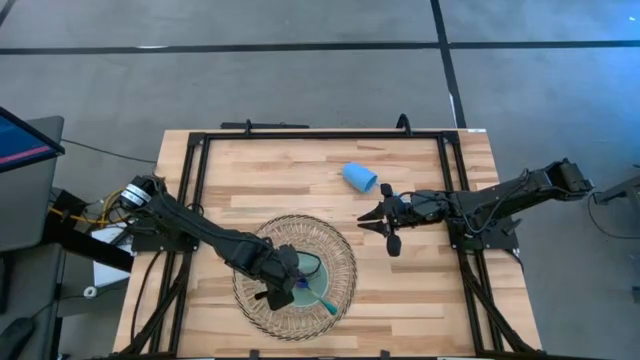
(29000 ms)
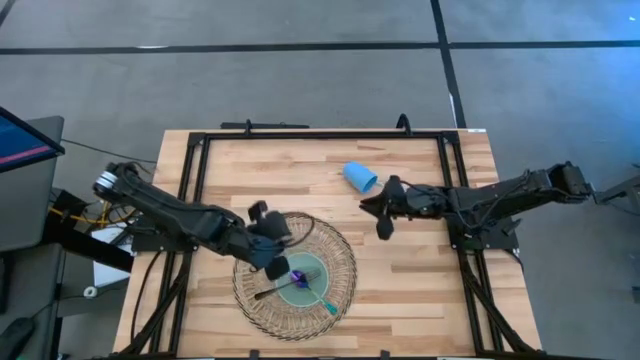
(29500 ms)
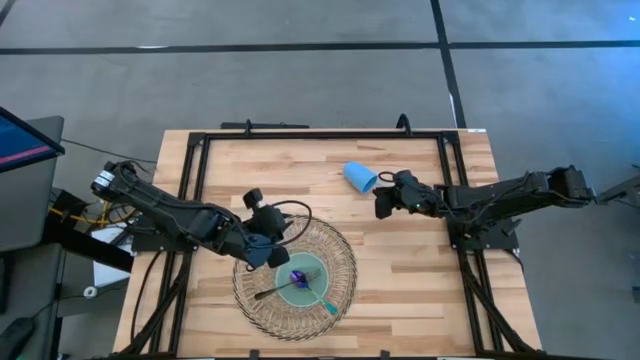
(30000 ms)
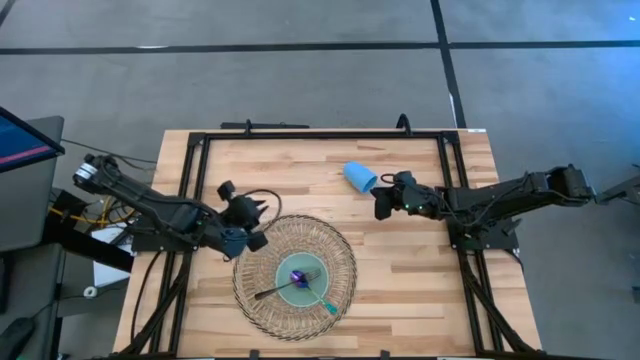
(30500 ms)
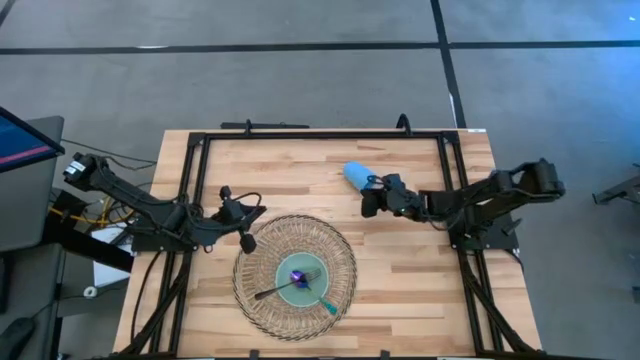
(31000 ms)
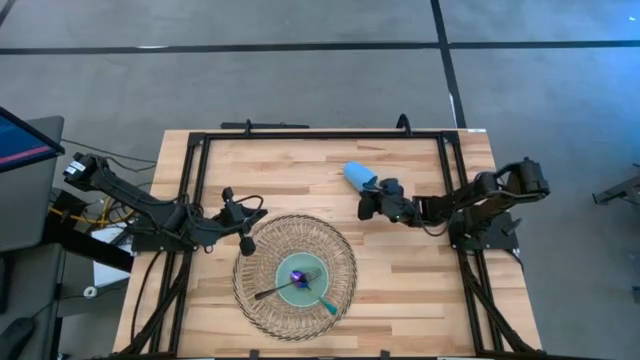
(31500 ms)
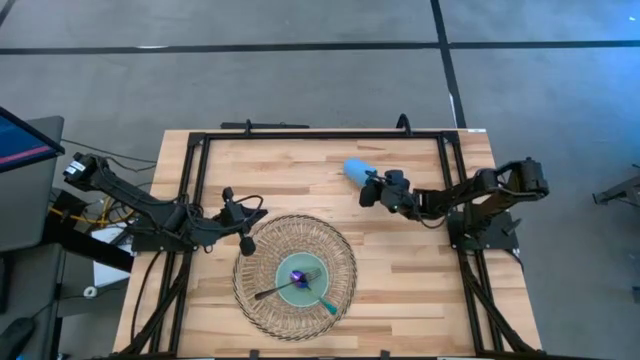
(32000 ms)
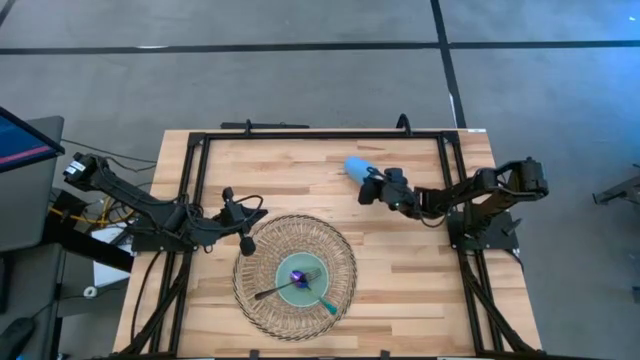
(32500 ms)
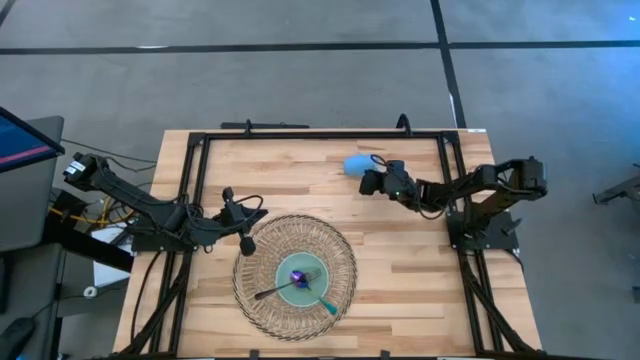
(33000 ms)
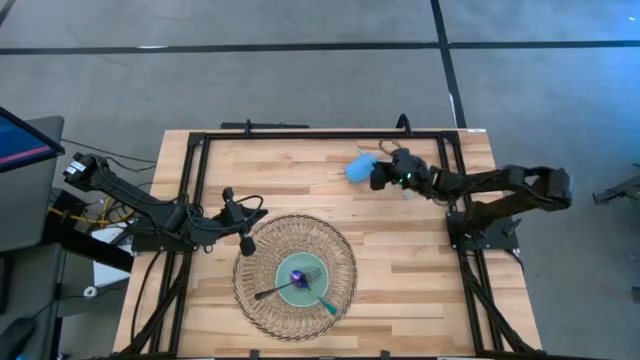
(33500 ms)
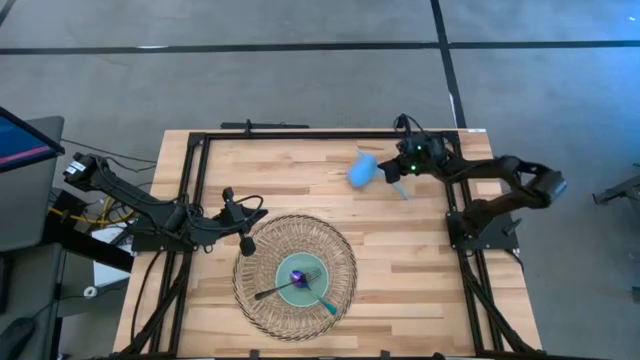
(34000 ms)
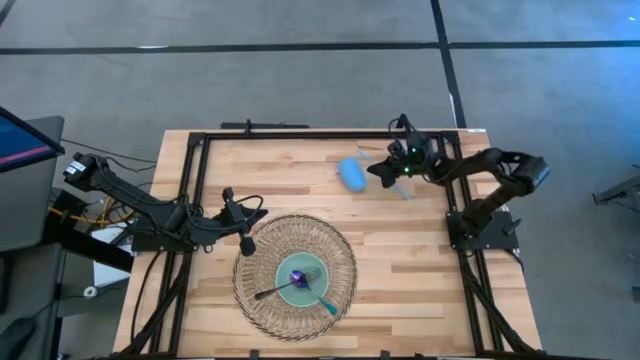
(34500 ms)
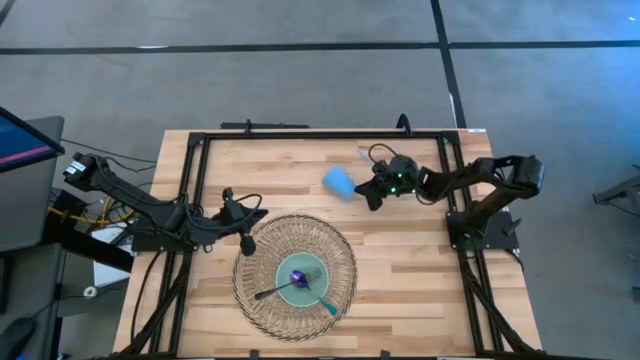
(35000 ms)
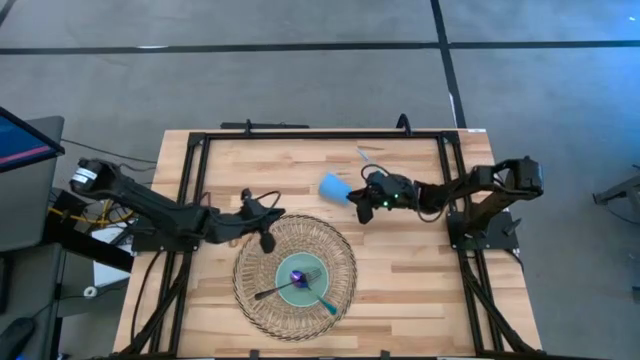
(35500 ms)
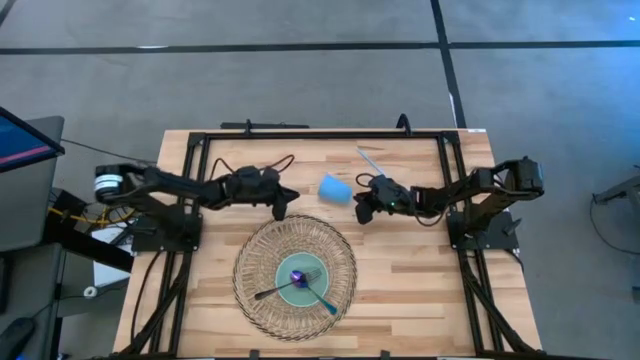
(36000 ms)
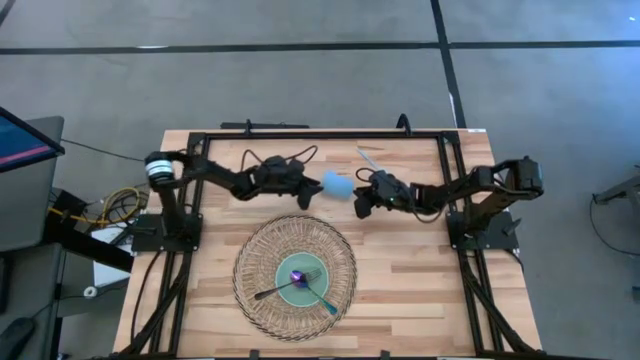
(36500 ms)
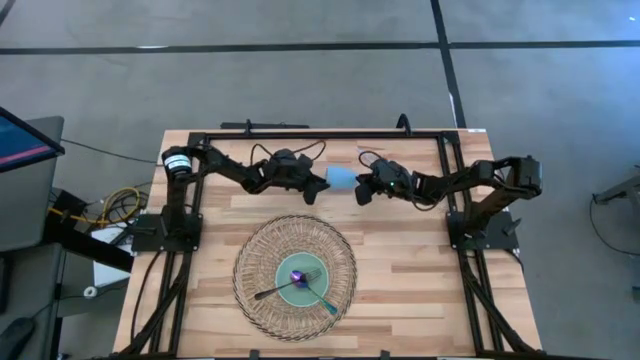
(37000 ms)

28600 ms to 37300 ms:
Task: Pick & Place Utensil
Put the blue cup on the top right of the woven placemat

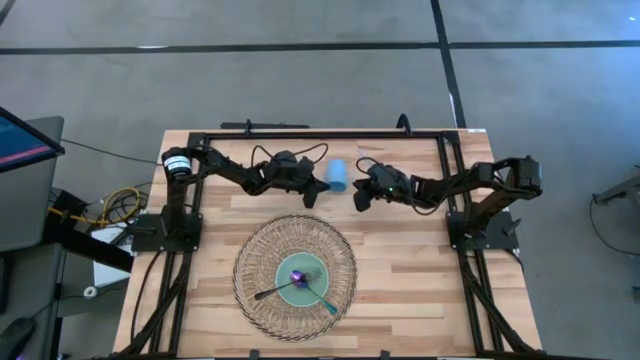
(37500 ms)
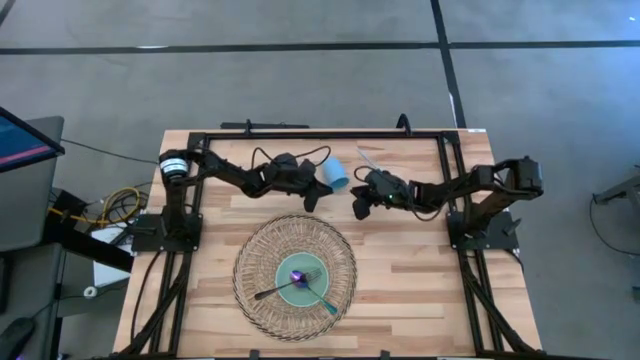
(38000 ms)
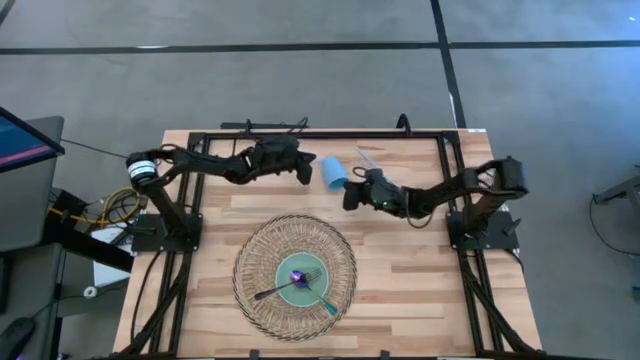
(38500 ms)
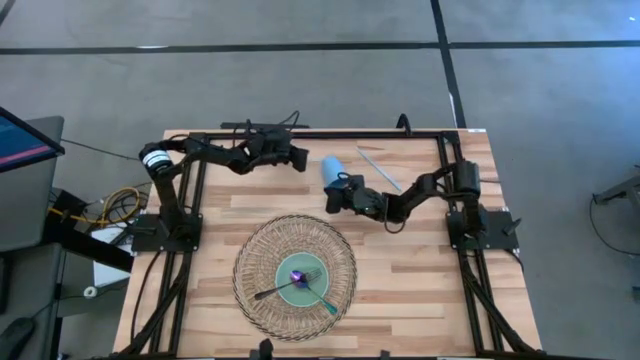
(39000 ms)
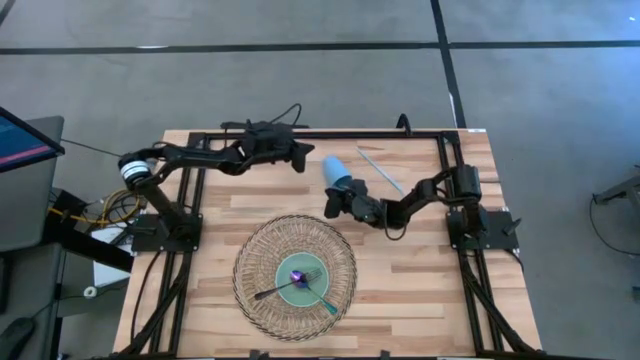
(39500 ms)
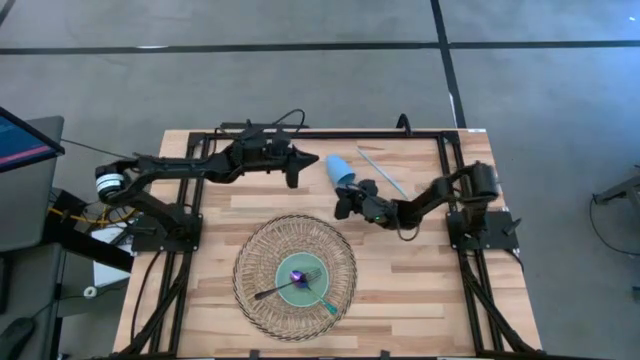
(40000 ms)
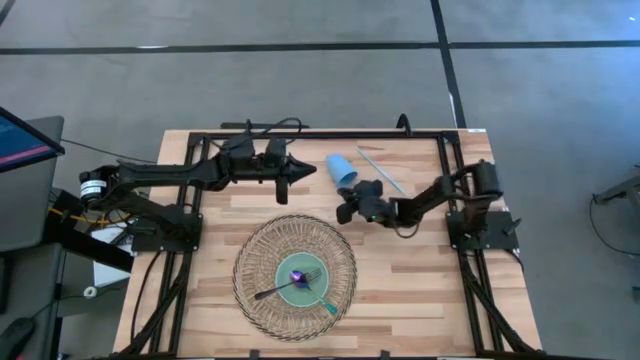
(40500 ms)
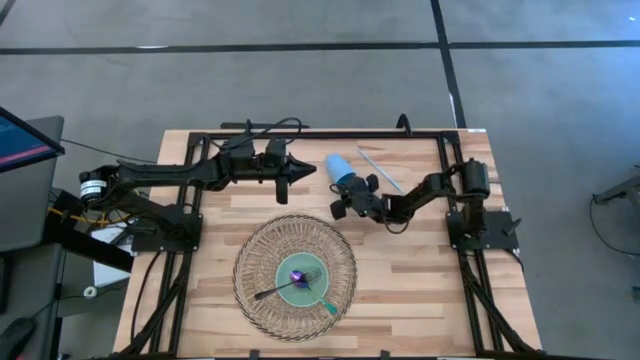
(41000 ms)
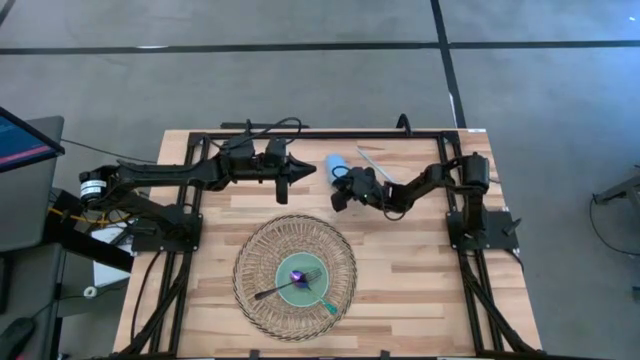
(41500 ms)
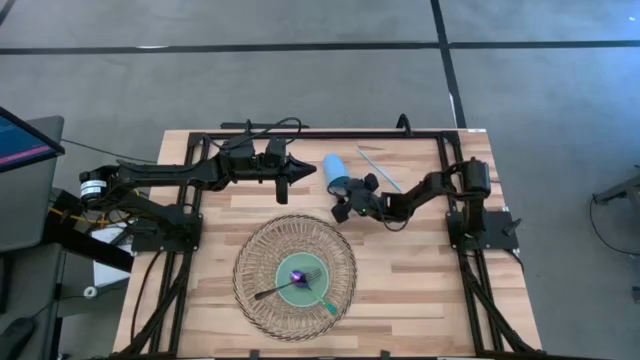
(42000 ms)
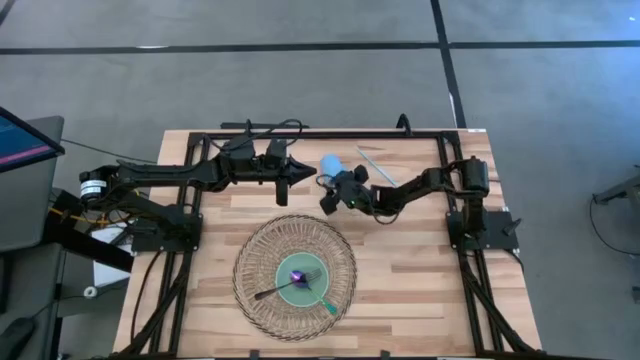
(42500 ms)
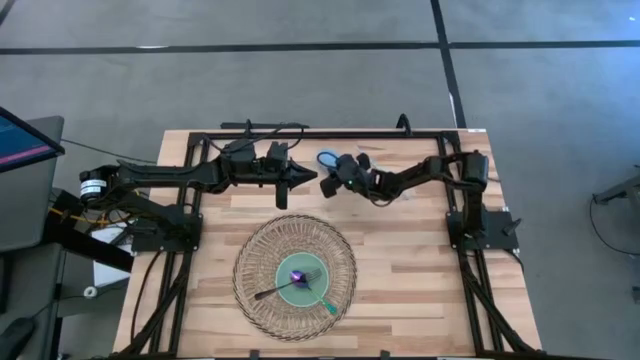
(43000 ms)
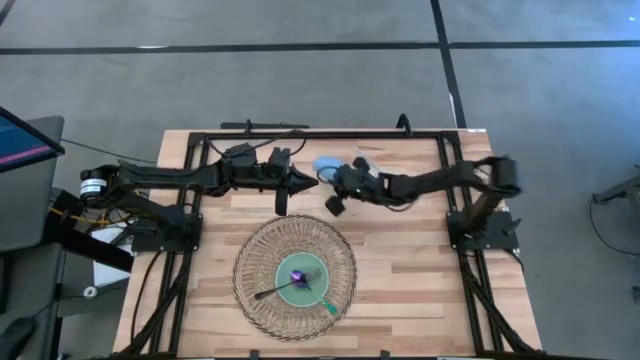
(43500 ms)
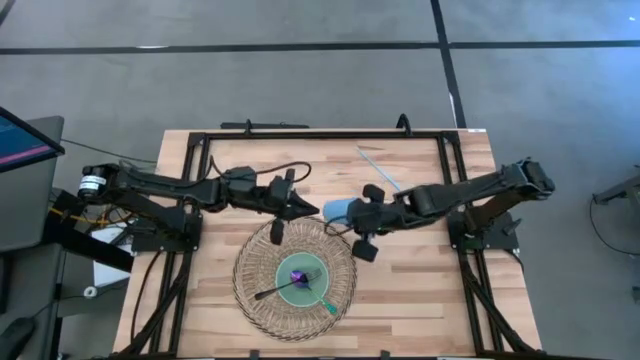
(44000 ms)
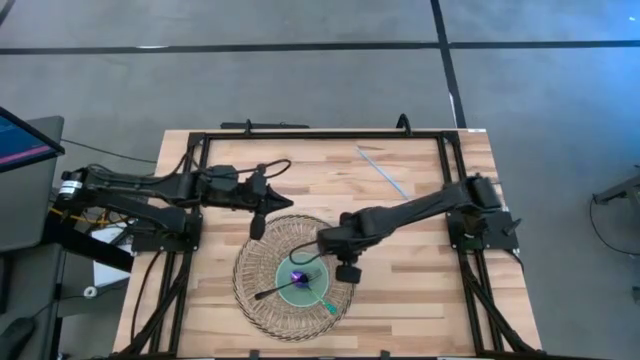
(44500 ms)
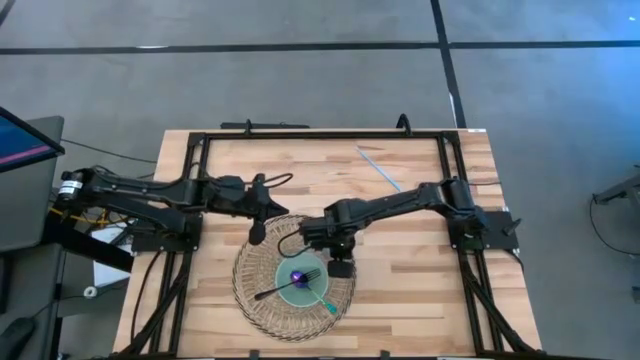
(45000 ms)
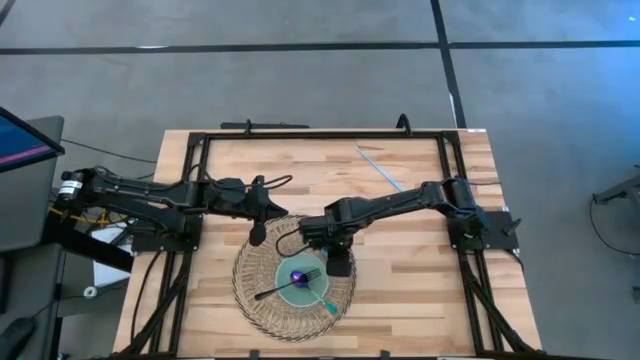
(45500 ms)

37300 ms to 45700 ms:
Put the blue cup on the top right of the woven placemat

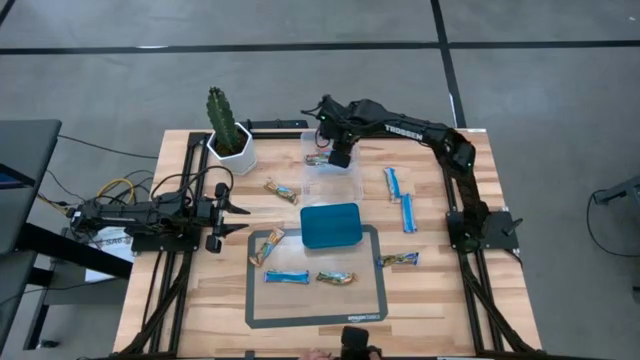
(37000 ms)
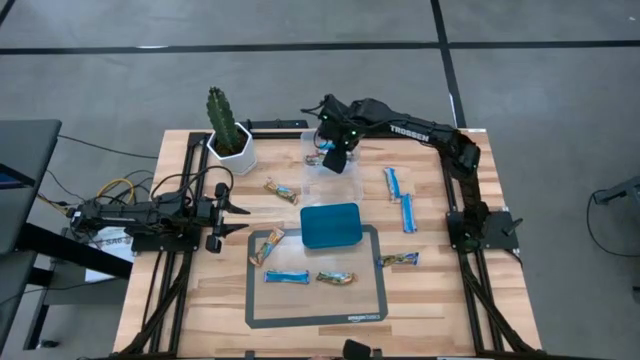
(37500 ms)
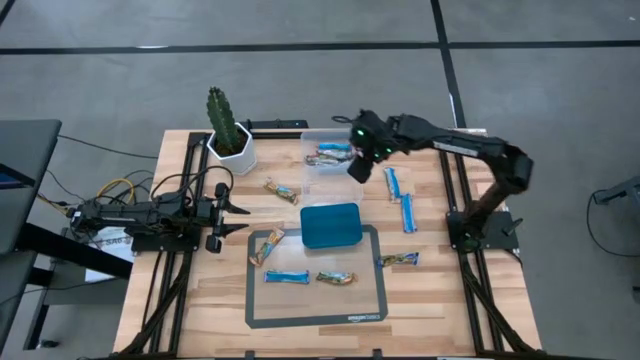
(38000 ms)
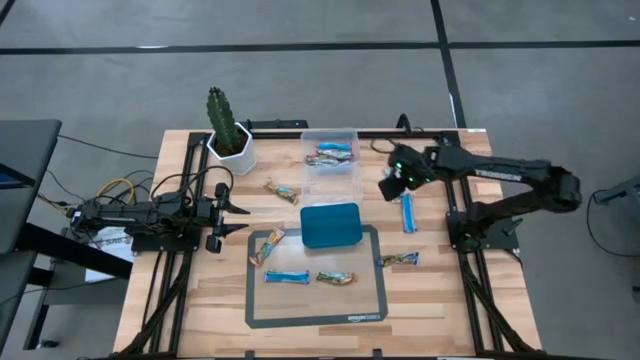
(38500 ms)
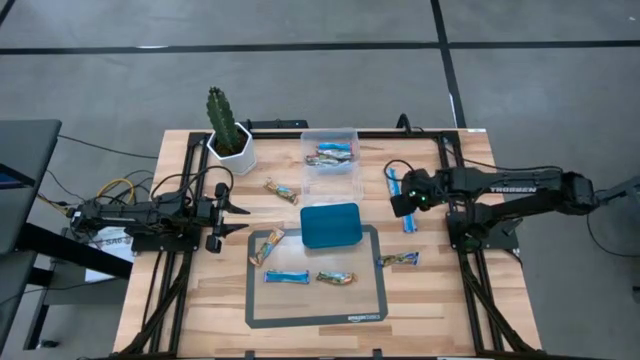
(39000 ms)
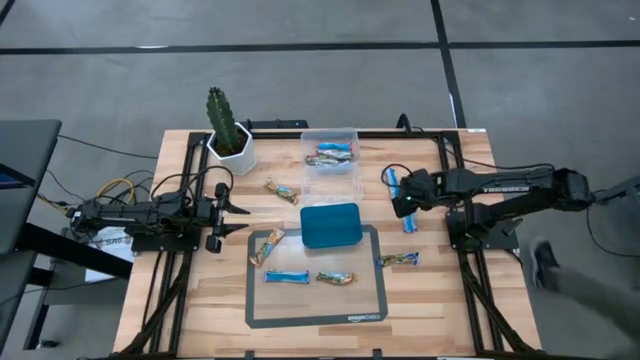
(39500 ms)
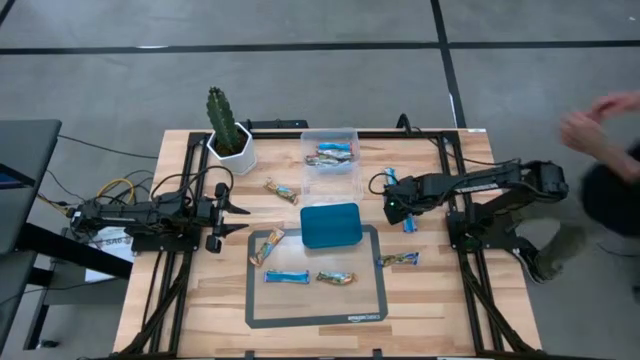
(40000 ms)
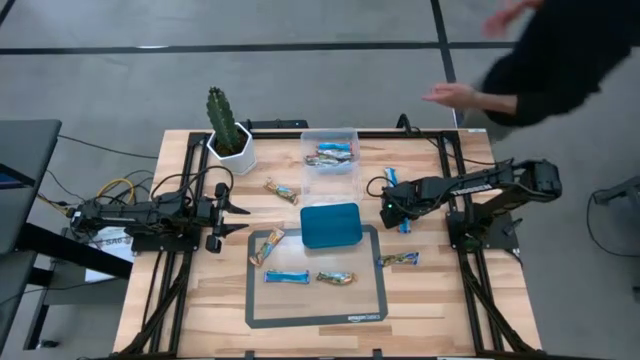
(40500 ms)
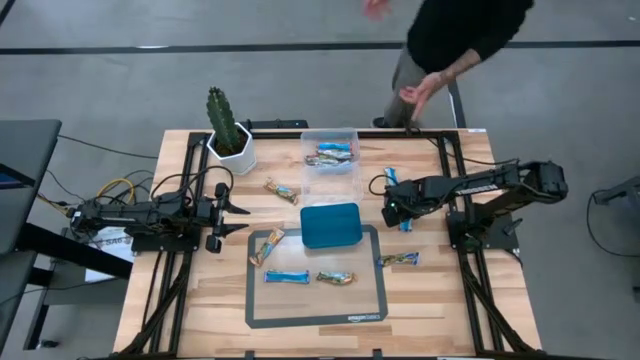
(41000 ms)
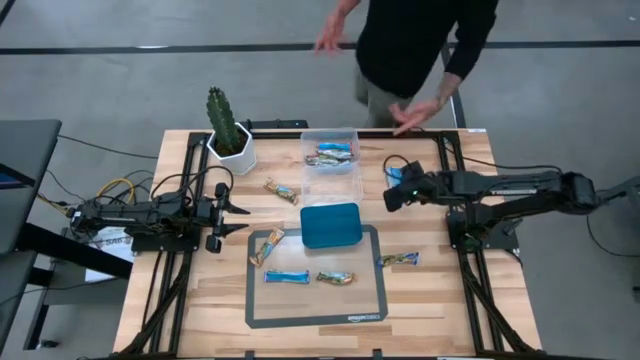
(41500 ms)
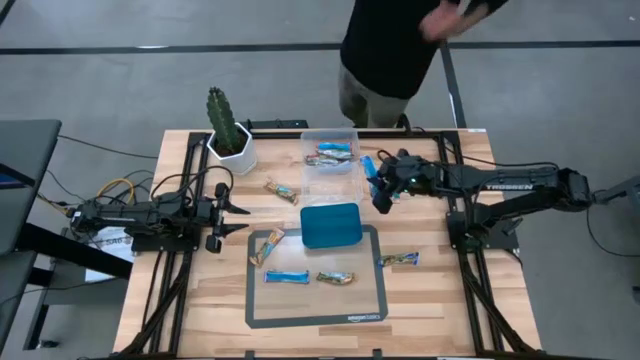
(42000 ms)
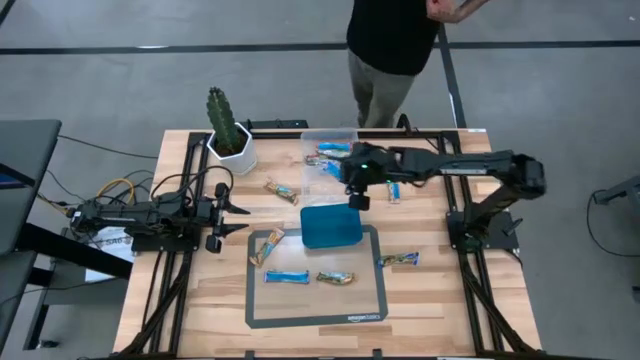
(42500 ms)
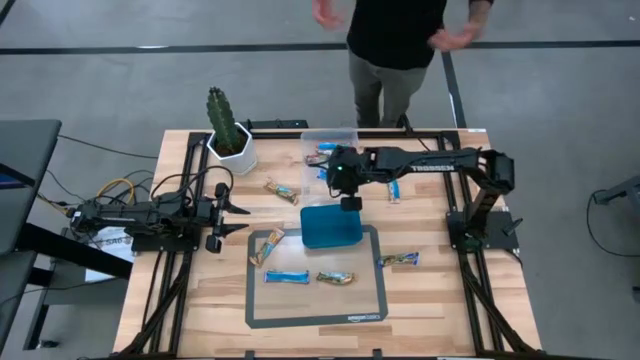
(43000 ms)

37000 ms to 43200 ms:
Task: Pick and place Granola Bars by type
Put the top blue granola bar into the bottom transparent bin
